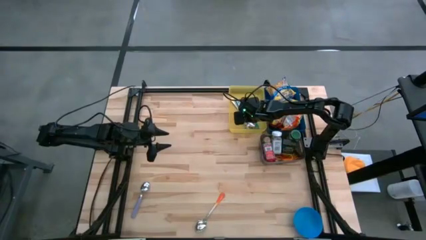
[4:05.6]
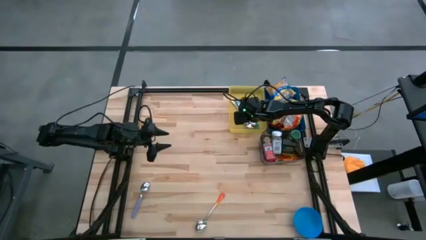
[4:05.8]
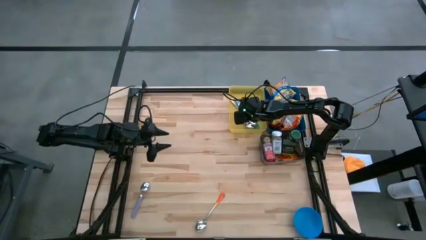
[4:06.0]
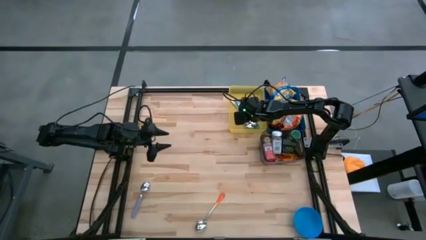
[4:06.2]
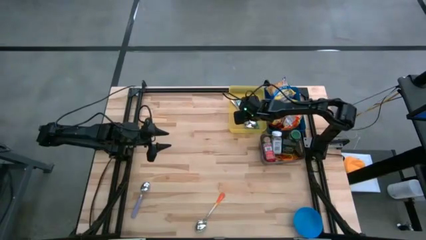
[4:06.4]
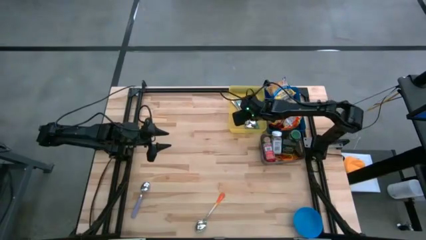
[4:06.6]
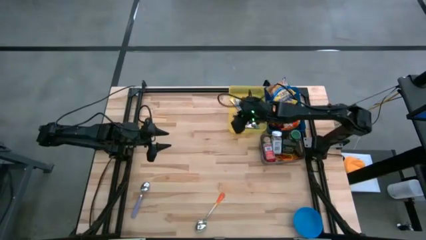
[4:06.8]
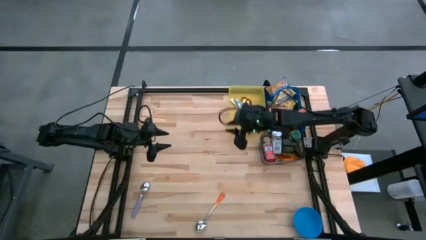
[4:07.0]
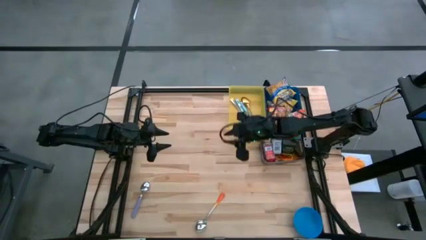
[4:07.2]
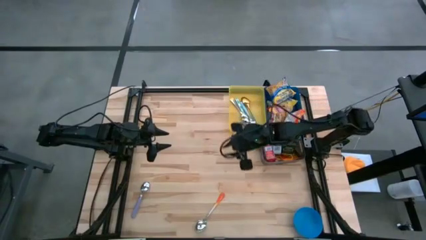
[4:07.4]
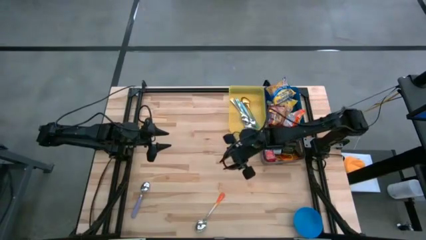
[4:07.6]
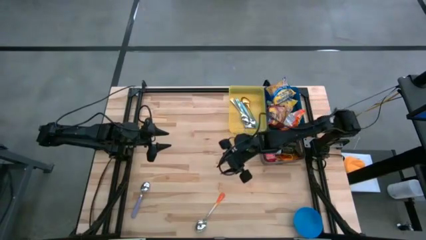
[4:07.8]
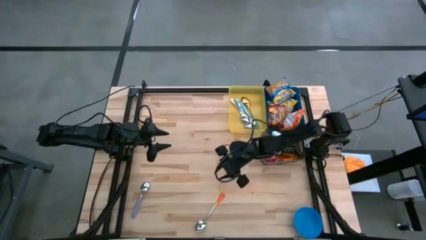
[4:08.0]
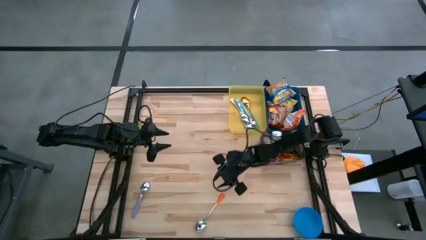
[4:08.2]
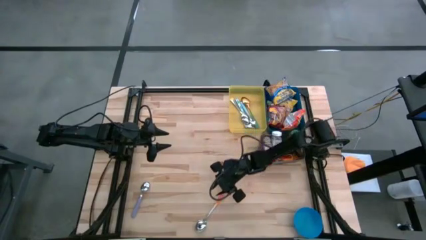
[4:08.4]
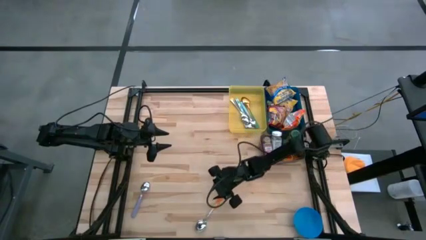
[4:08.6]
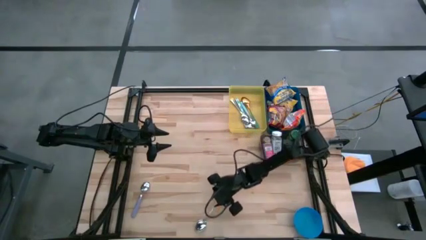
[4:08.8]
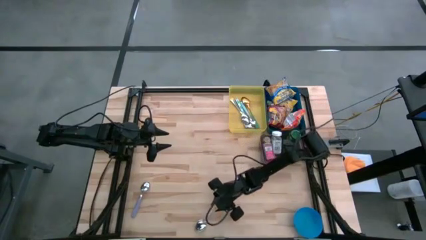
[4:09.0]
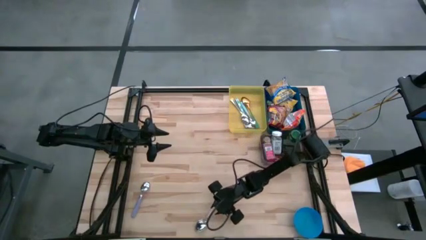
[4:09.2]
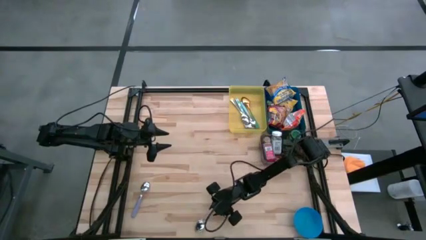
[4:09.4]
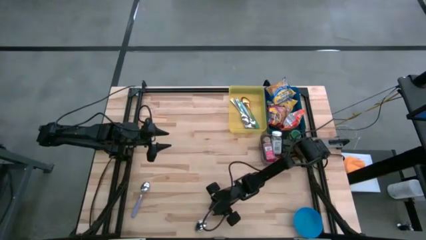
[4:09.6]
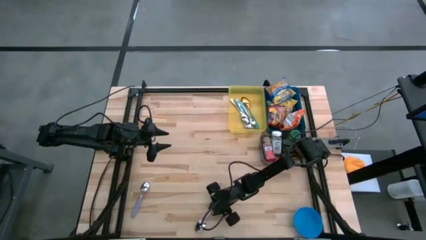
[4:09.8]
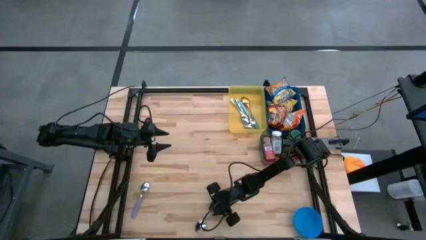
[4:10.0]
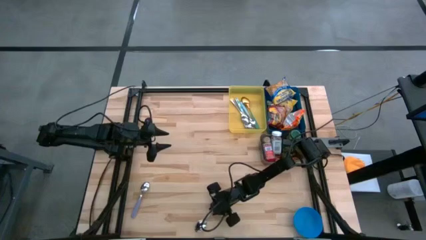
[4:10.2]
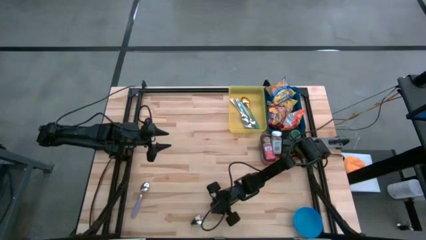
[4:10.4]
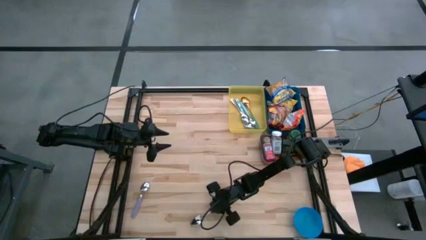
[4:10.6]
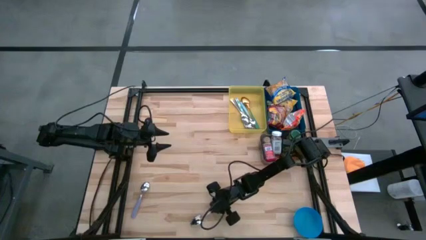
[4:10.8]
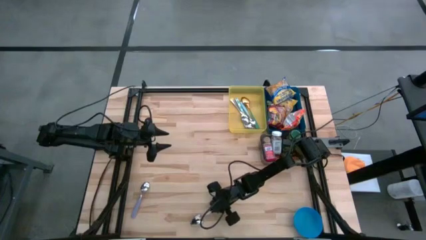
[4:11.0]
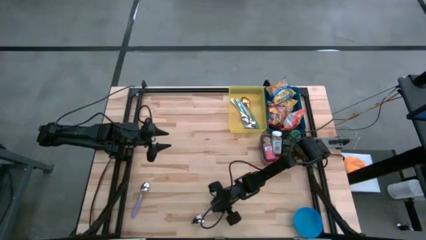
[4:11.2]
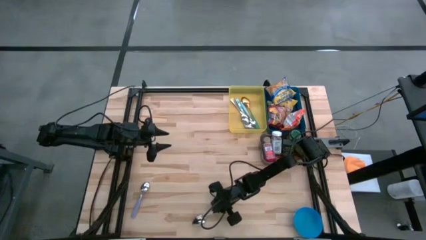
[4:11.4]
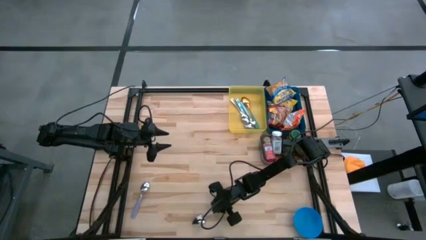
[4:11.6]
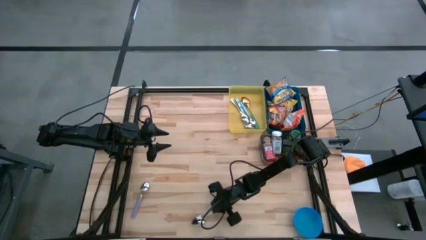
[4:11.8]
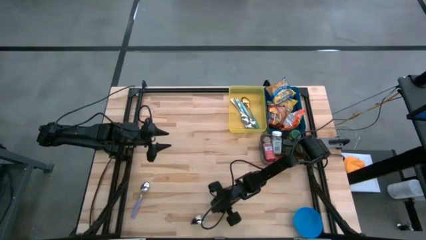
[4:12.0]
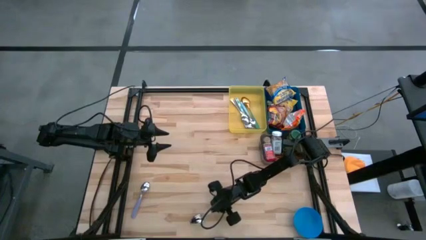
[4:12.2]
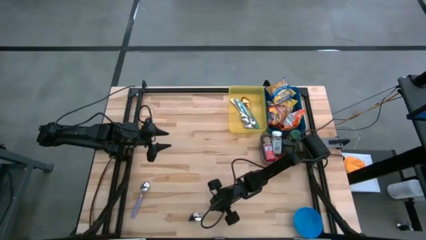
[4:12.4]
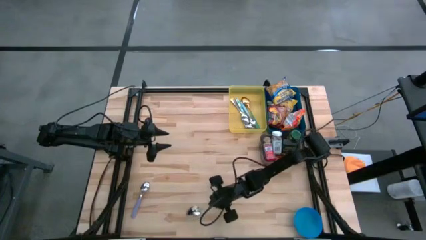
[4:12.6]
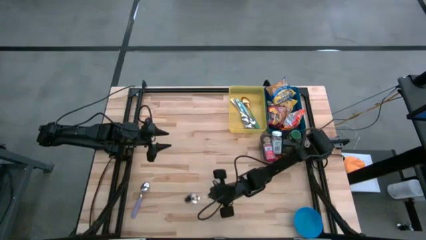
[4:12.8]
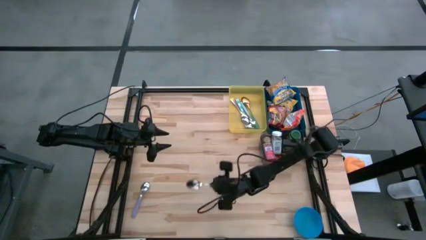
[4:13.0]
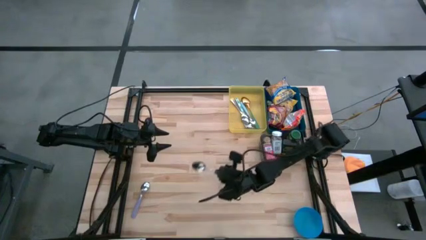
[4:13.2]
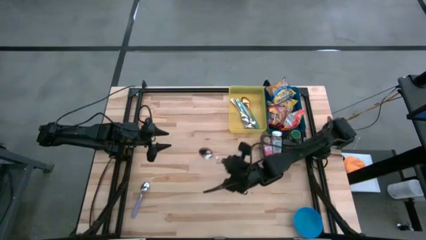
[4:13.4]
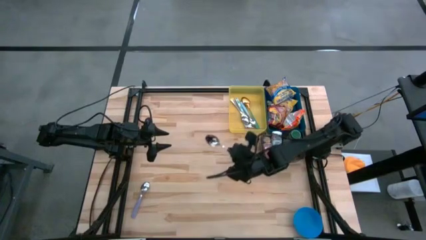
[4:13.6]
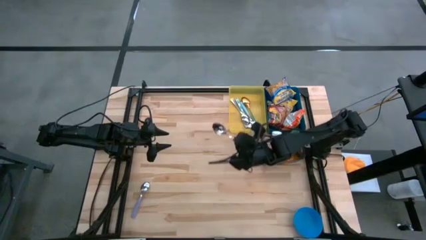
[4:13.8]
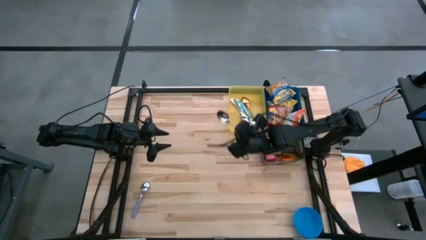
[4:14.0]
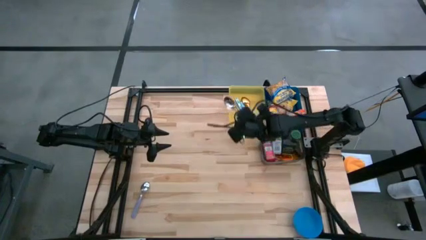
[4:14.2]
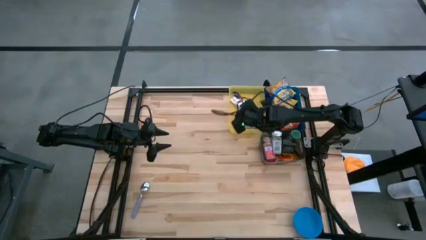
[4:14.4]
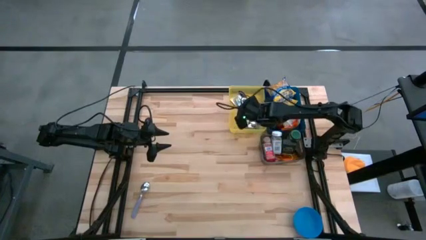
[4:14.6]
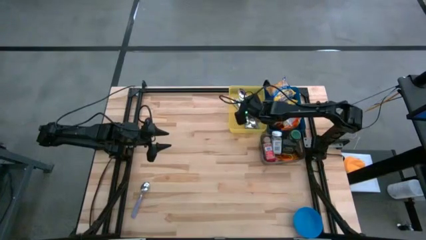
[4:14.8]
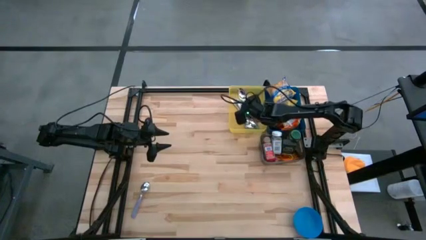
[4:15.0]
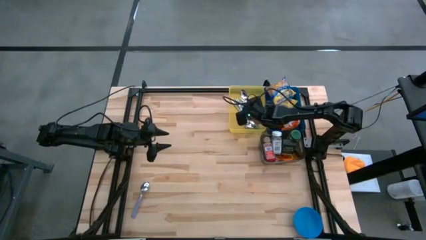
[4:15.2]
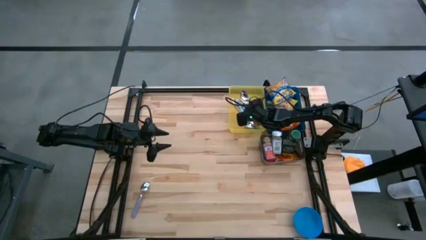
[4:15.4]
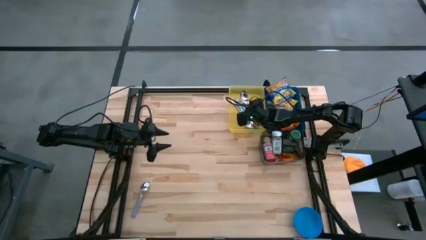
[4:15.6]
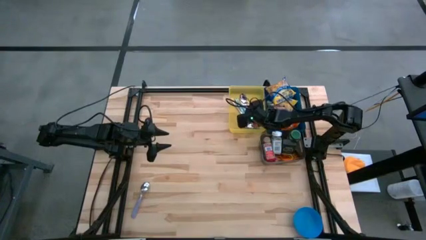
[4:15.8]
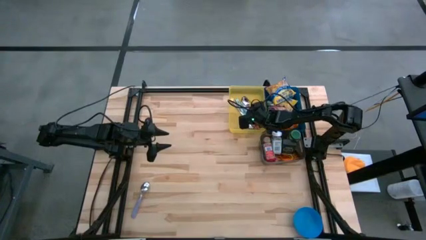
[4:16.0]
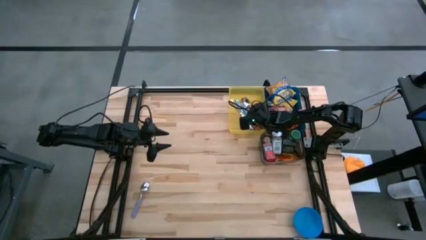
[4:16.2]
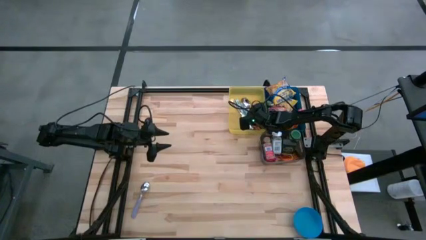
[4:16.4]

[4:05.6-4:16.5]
Put the orange spoon into the yellow bin
